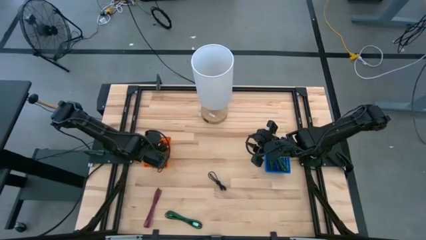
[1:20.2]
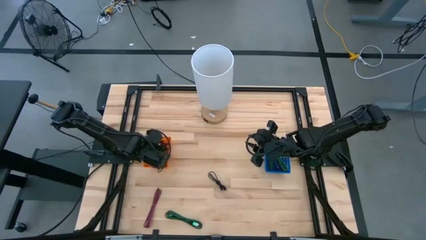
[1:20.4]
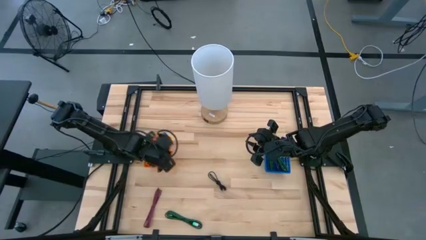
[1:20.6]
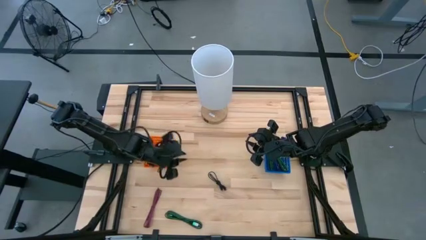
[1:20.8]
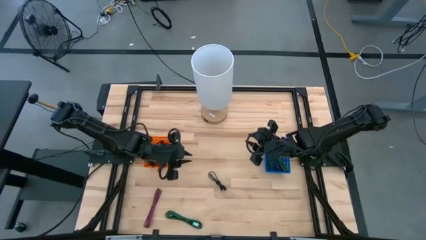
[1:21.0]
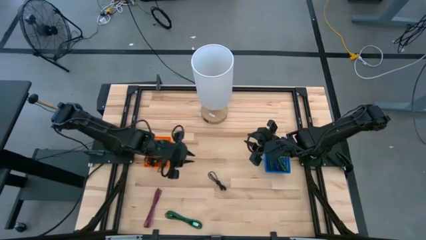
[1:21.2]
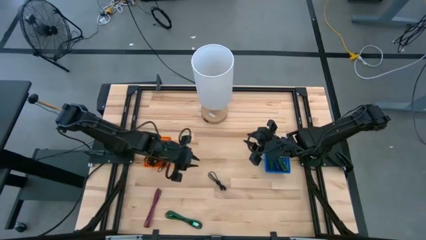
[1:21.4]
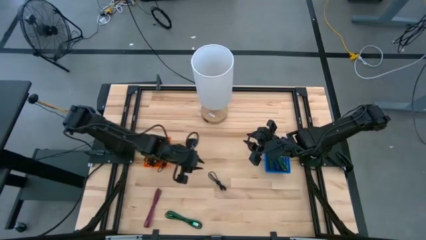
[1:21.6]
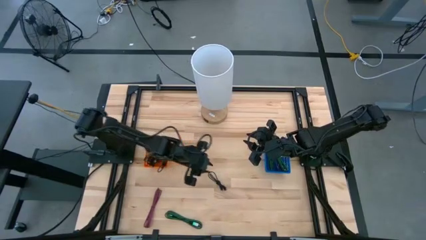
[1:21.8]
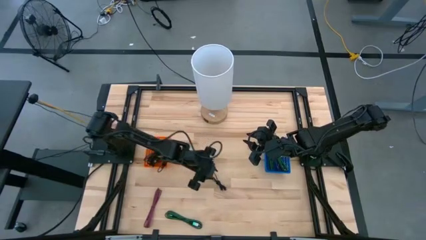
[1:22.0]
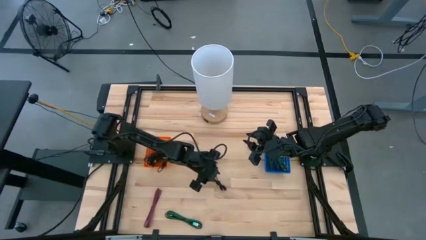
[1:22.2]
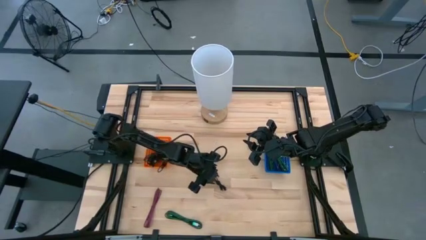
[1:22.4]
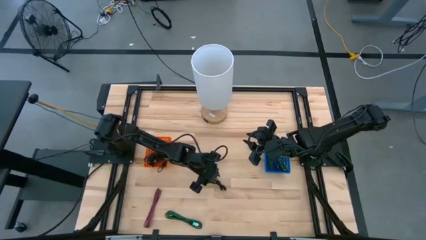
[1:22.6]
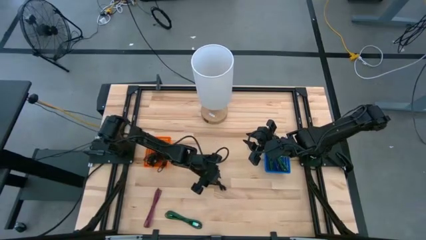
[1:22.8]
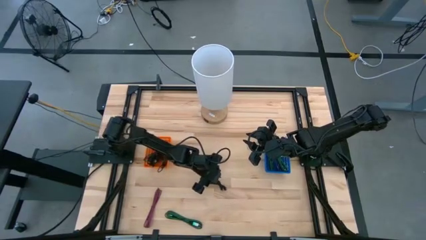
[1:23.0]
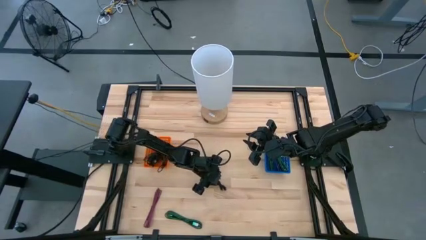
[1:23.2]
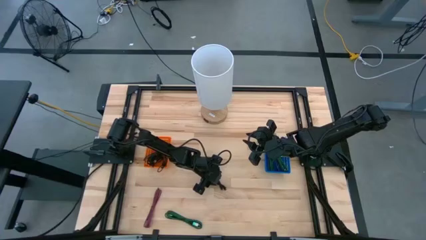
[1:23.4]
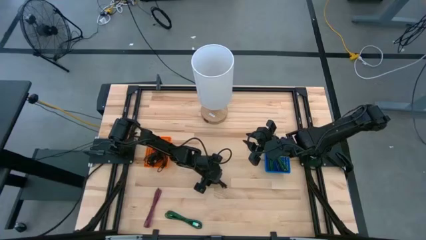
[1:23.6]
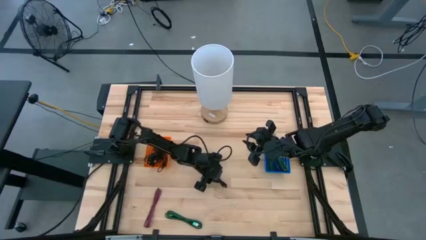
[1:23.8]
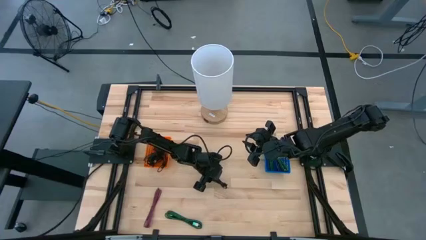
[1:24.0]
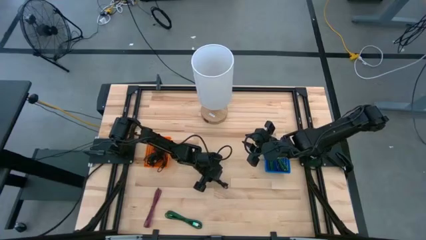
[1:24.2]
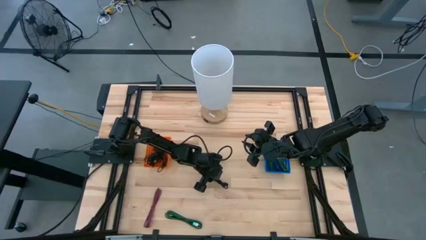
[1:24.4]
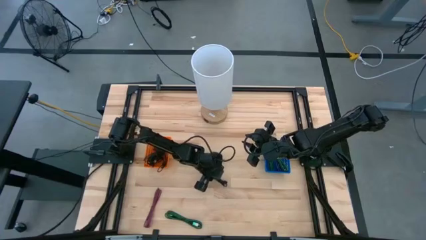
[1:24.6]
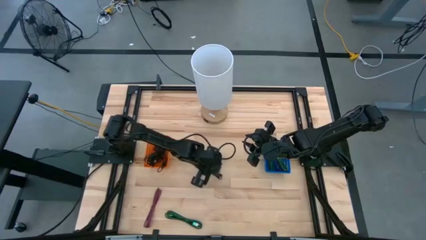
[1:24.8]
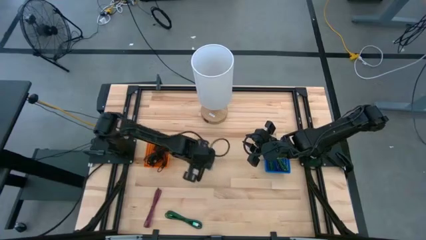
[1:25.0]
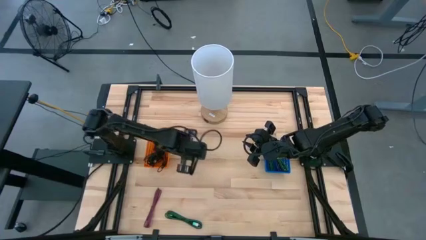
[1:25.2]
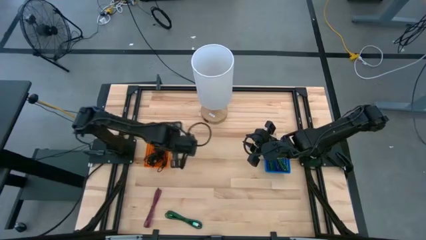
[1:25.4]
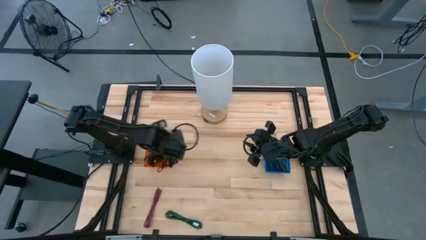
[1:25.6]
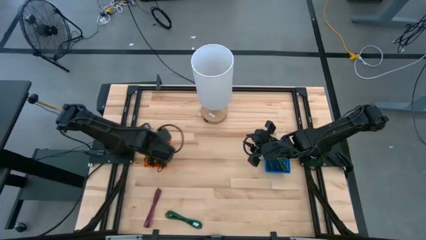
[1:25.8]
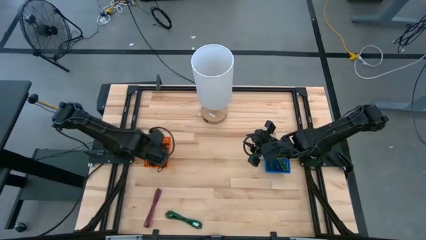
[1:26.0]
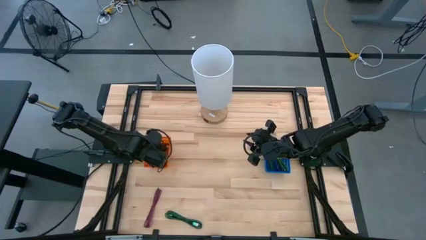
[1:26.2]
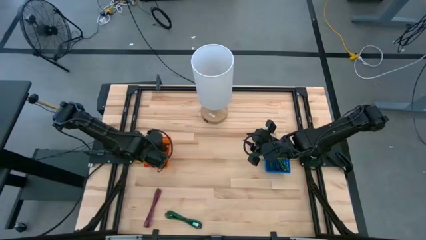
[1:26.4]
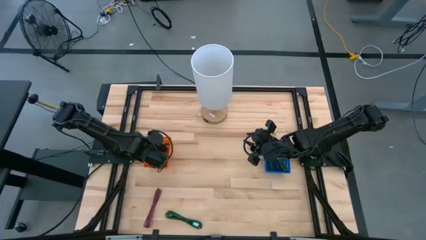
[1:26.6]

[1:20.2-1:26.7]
Task: Pick & Place USB Port
Put the black charger cable into the orange bin

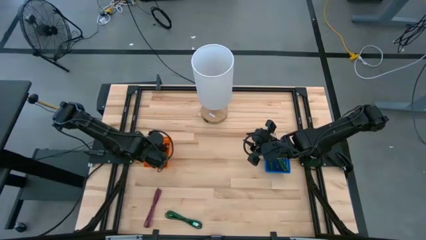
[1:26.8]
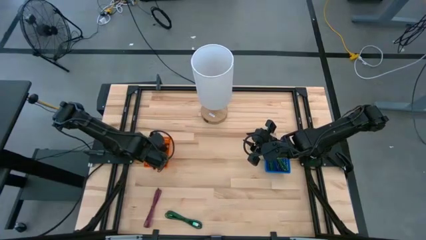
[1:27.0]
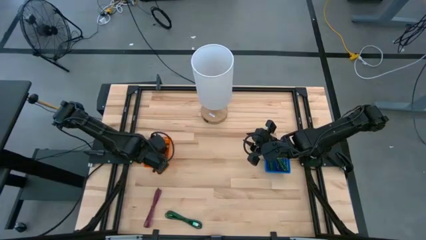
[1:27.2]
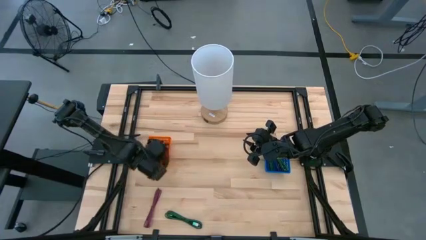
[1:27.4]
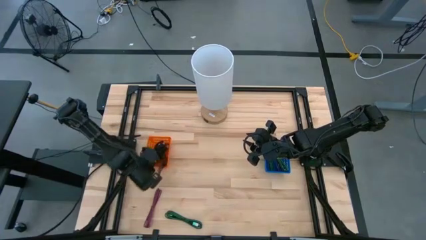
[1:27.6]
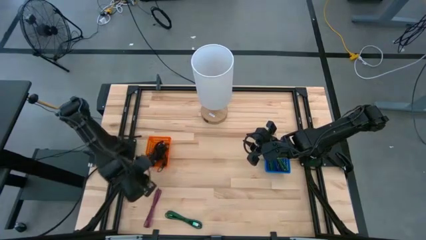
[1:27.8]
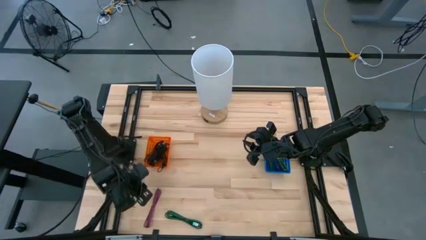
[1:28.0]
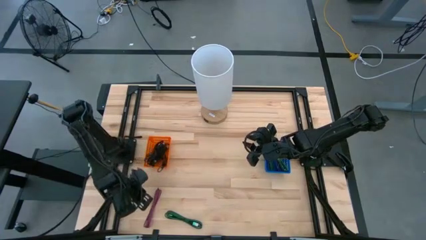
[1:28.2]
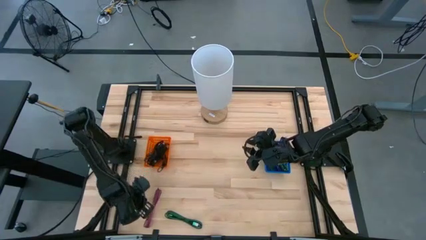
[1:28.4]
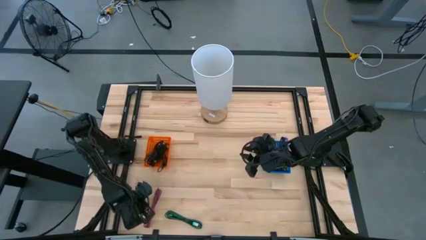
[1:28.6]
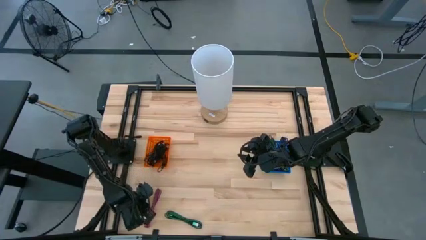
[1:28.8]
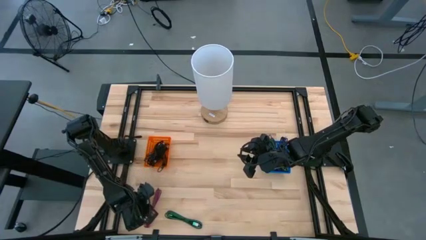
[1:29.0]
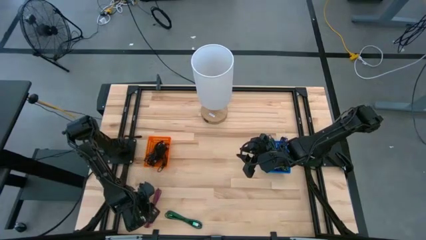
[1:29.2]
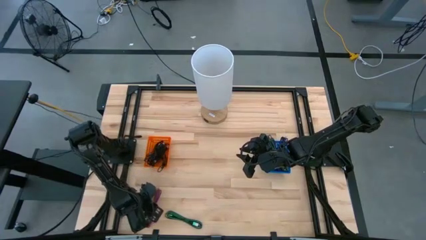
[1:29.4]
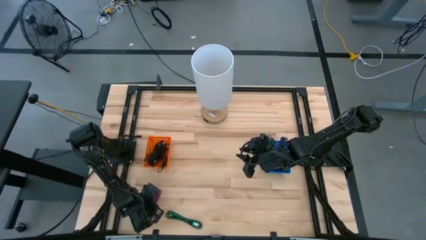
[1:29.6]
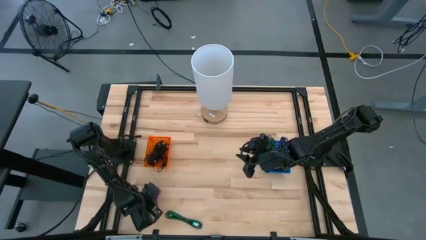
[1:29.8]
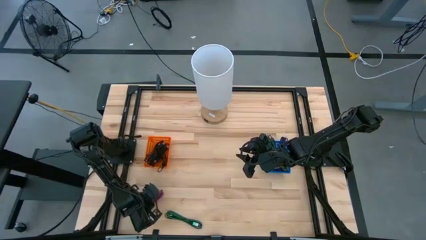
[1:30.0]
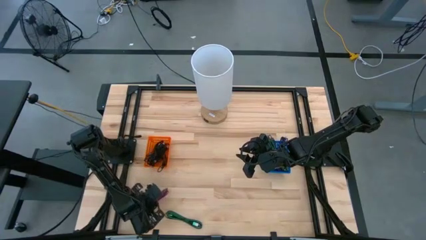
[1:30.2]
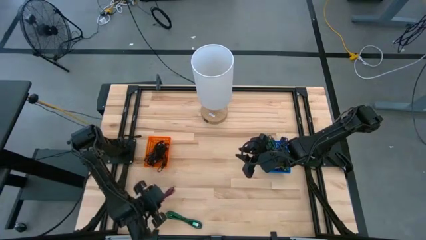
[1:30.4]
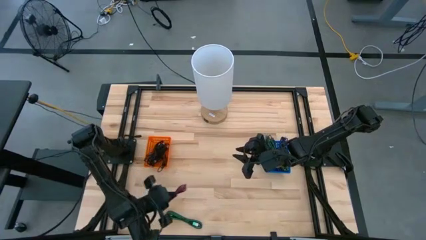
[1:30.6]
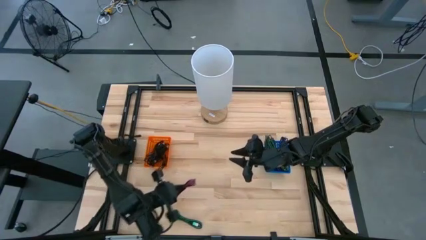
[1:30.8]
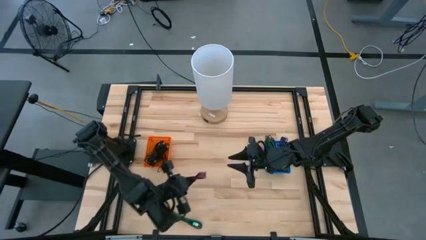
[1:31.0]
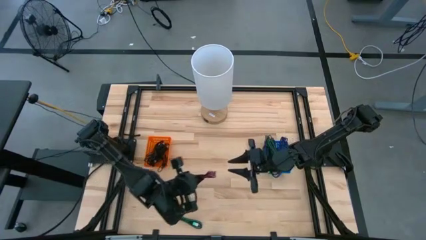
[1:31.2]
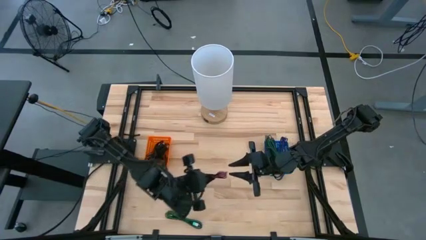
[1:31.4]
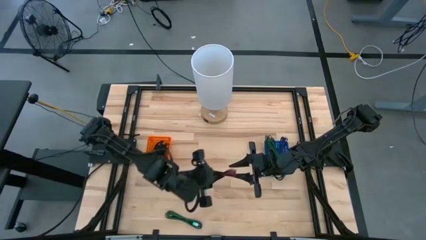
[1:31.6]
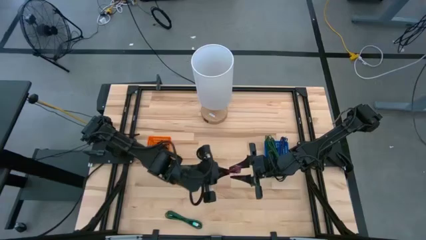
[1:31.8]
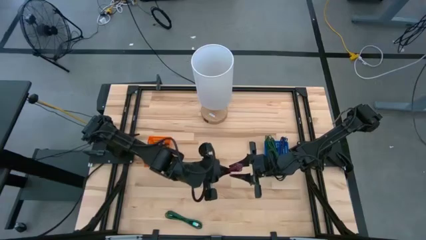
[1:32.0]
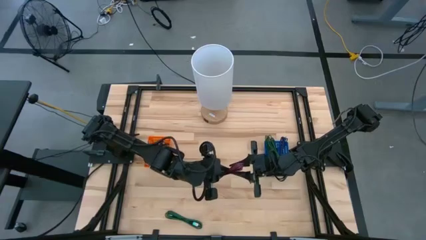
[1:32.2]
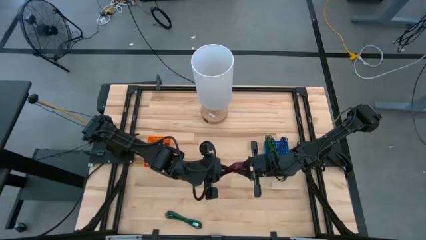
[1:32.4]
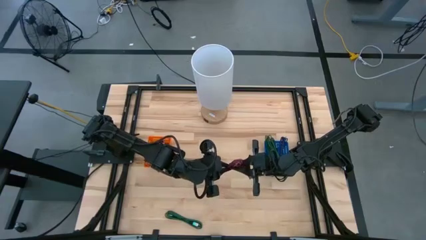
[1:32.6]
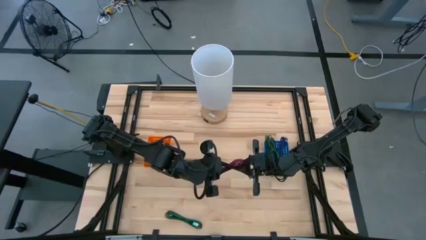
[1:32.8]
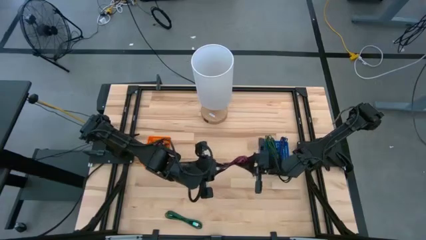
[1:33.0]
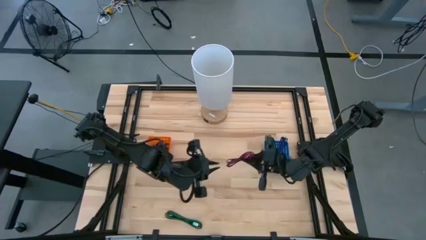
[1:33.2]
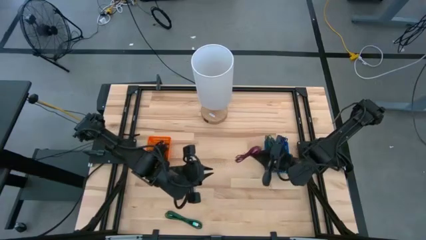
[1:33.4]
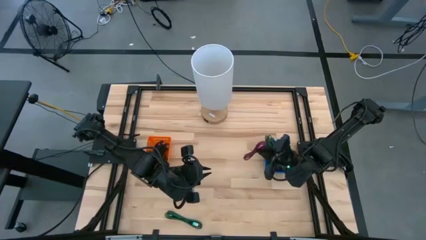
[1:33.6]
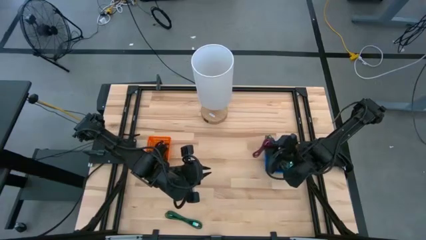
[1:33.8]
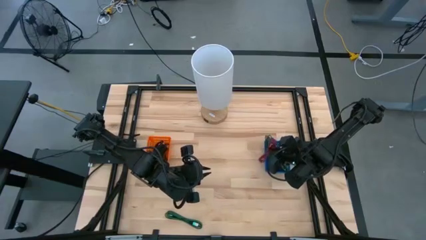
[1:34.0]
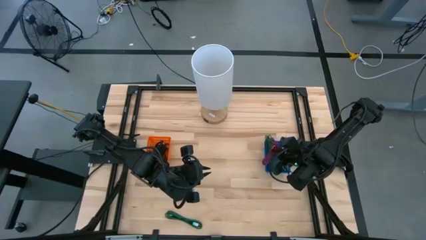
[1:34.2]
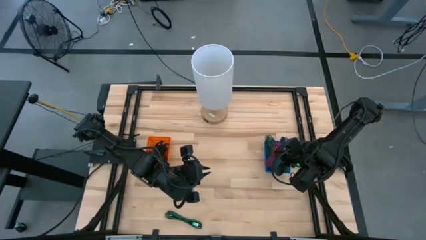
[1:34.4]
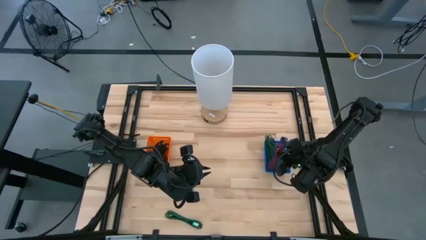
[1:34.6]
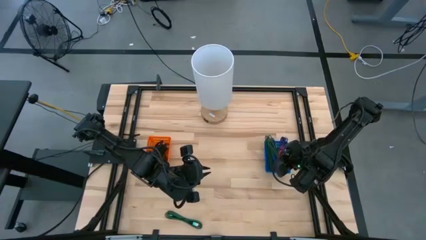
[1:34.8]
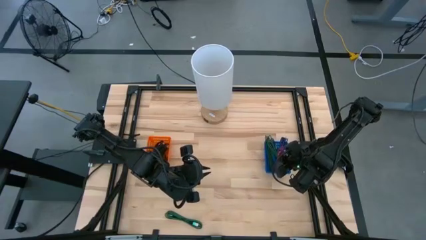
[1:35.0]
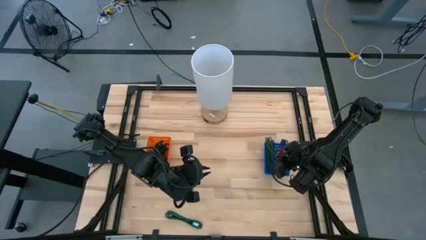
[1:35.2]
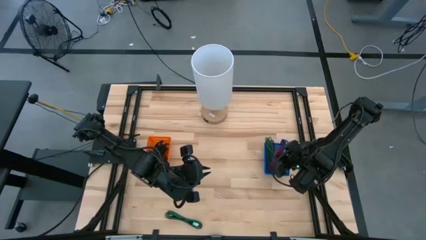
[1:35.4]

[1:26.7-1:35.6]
Put the pink charger cable into the blue bin
